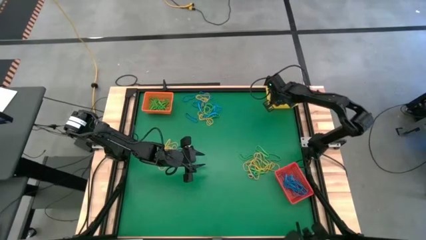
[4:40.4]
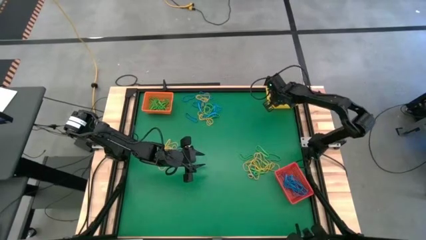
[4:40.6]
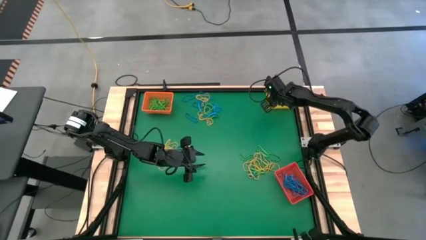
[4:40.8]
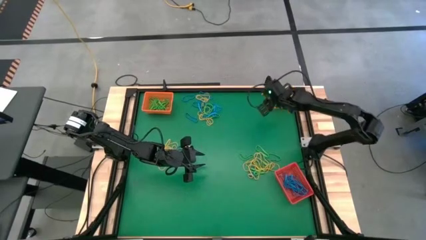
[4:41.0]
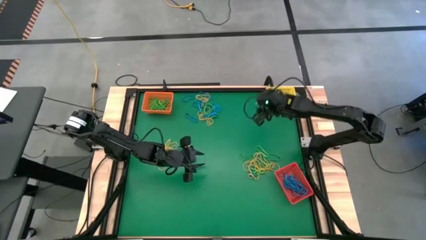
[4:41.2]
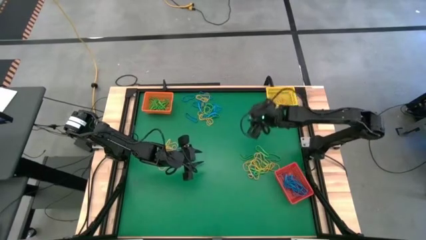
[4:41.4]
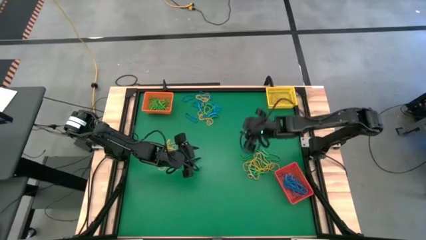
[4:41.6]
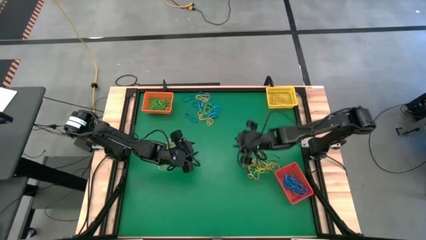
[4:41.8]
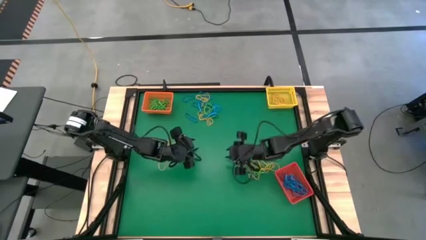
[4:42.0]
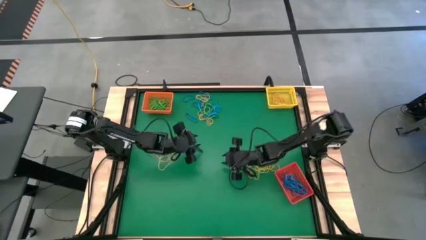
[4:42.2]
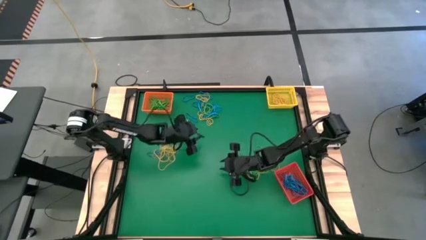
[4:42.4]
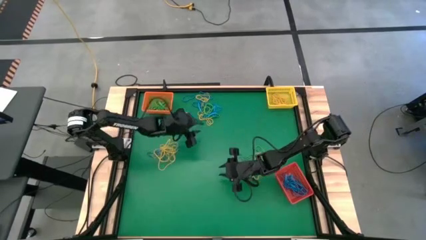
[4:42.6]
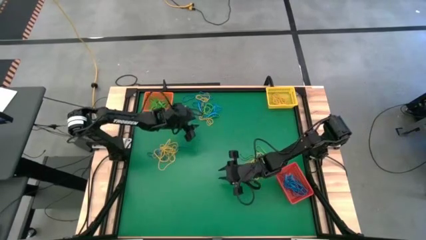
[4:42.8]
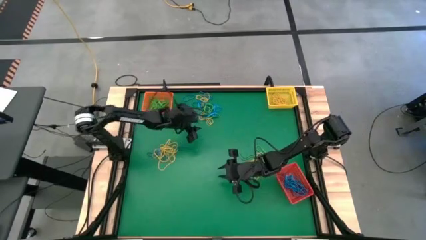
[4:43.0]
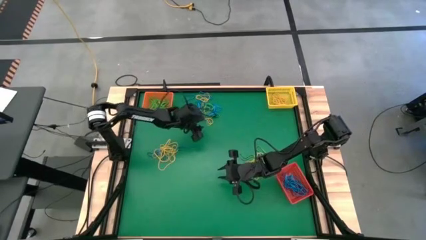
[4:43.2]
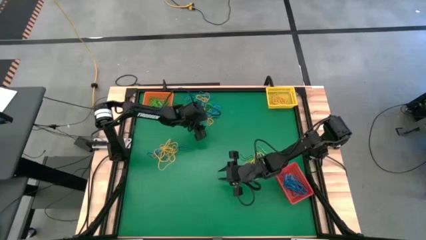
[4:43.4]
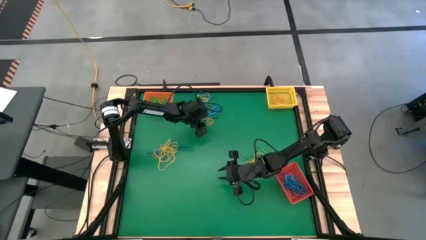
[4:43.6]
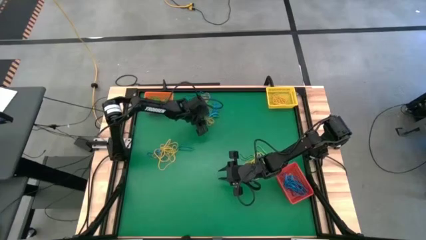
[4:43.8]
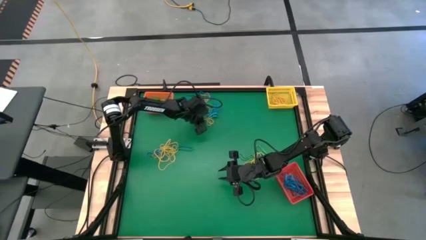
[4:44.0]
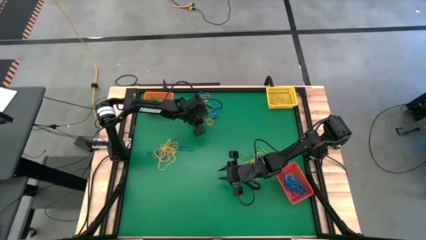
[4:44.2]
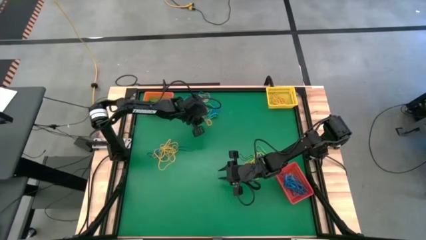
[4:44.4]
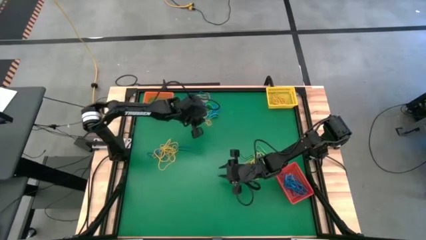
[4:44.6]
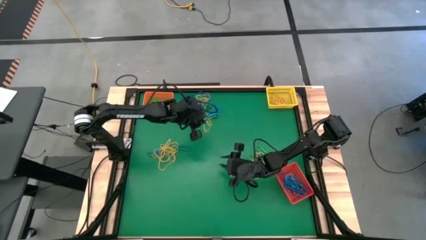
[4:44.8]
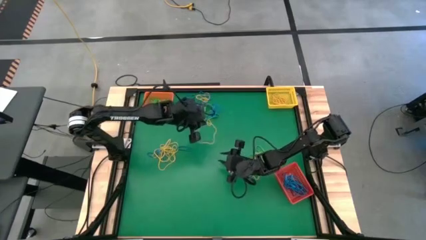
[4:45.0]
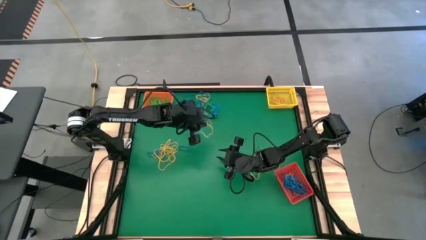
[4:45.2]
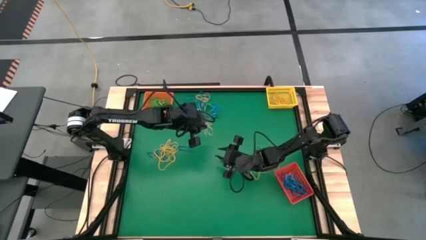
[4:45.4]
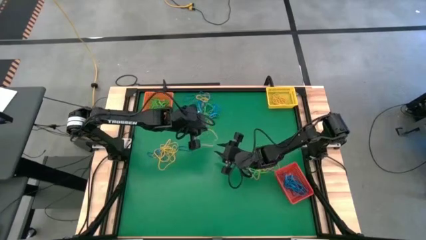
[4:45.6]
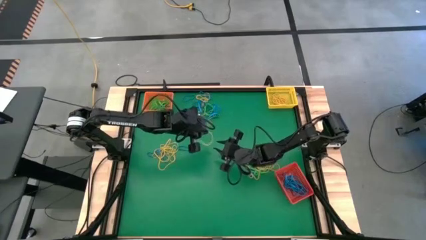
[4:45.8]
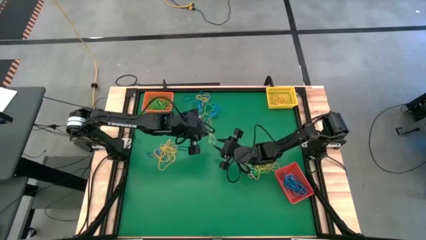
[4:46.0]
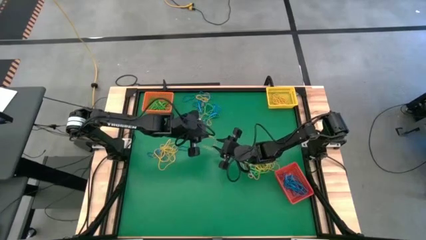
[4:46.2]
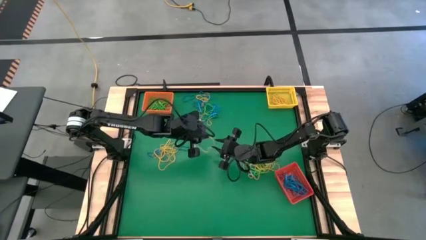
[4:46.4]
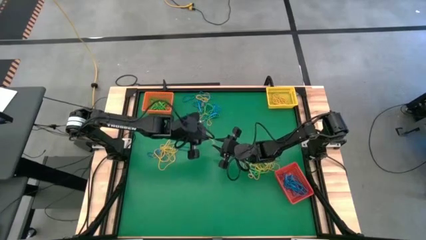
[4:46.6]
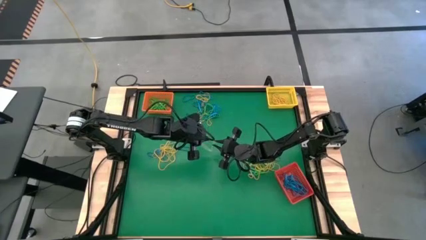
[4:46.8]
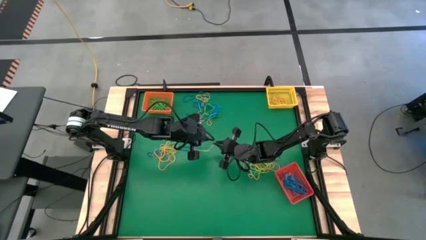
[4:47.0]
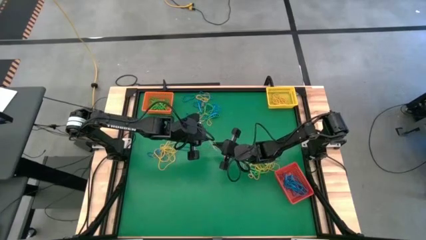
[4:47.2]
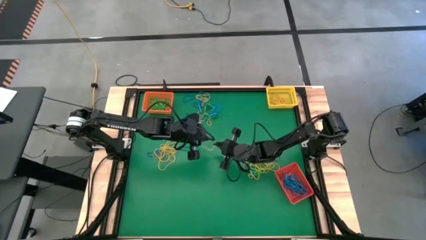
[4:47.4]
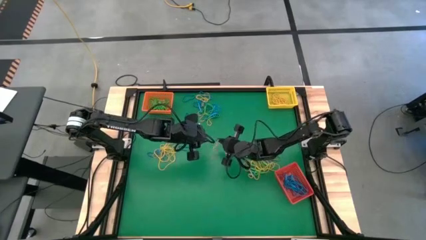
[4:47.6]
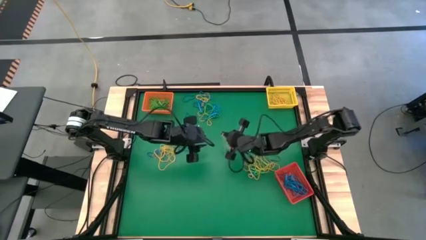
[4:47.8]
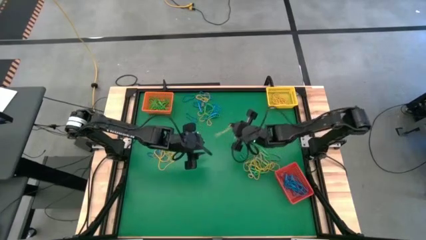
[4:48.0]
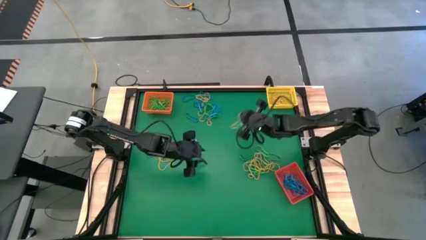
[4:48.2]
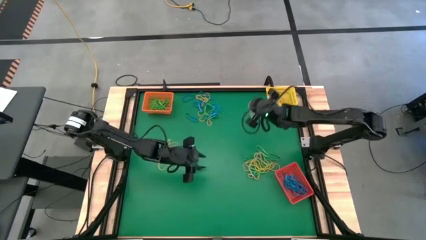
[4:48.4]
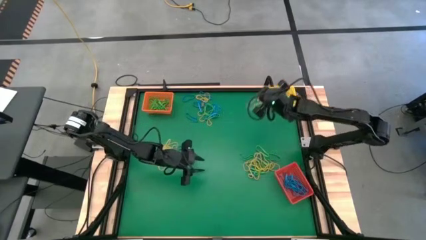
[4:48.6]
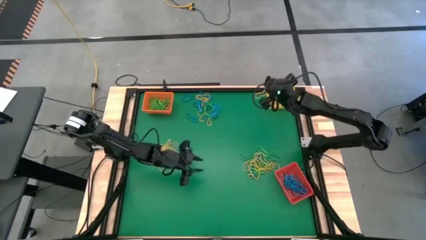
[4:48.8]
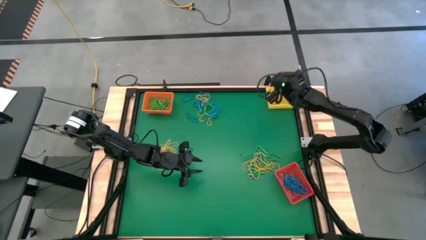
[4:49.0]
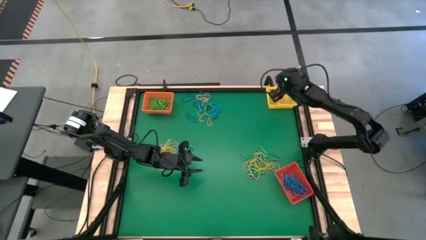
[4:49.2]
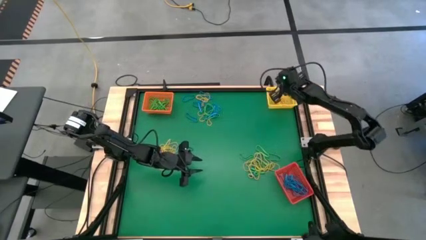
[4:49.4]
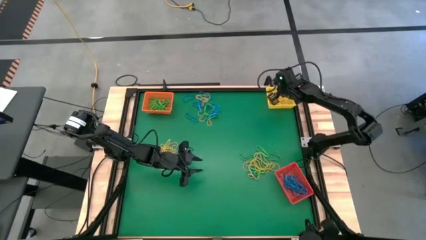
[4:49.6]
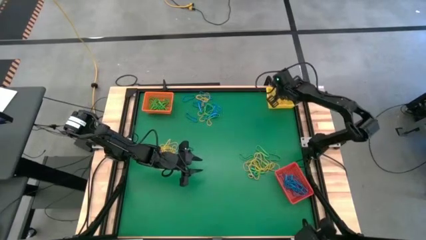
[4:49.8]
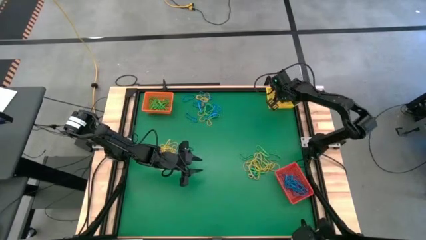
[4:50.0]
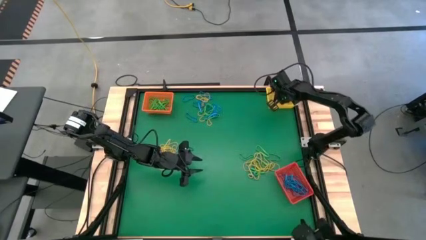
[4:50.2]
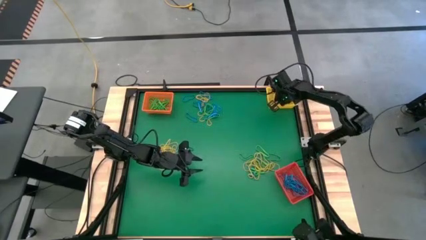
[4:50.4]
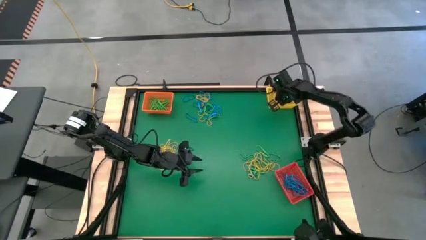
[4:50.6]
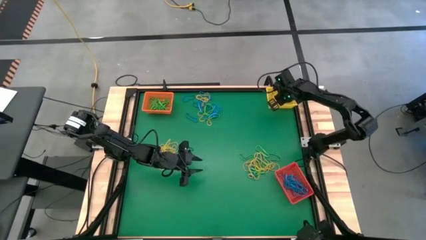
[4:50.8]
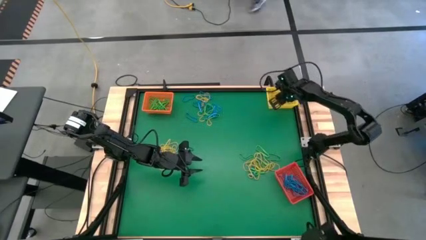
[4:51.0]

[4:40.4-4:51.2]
Task: Sort rubber bands into baskets
Put the yellow rubber band into the yellow bin

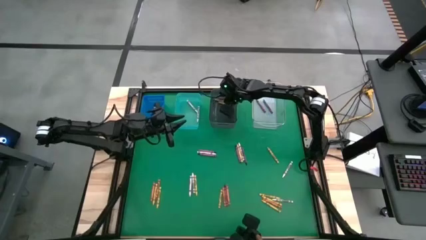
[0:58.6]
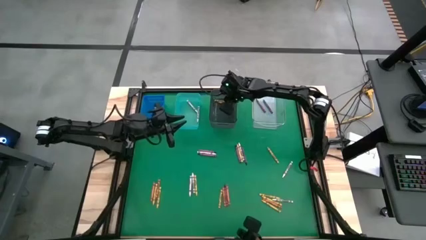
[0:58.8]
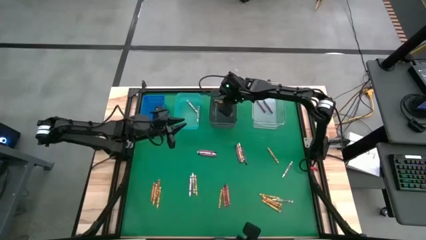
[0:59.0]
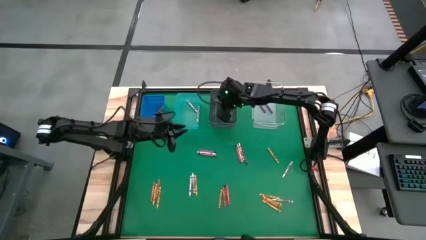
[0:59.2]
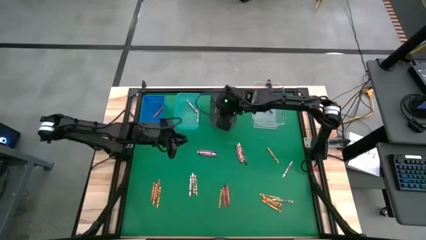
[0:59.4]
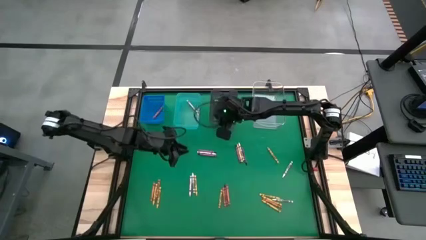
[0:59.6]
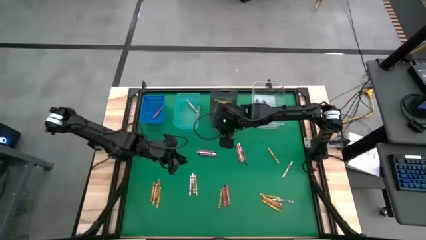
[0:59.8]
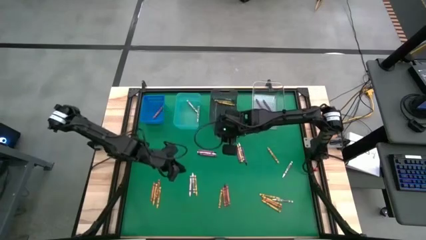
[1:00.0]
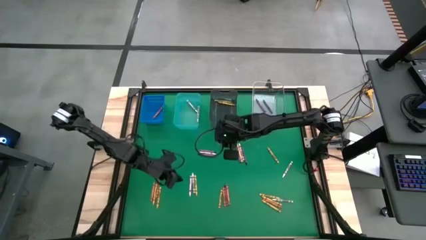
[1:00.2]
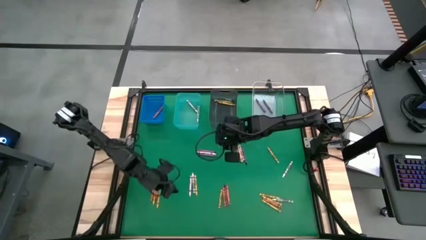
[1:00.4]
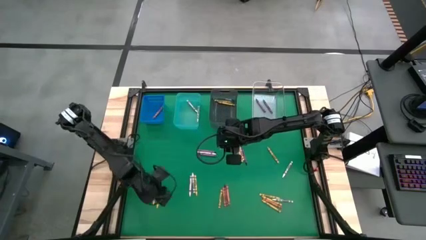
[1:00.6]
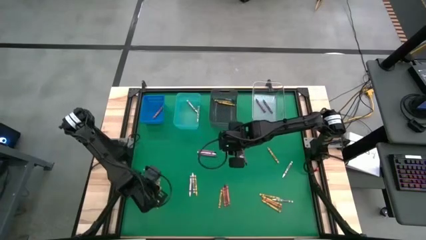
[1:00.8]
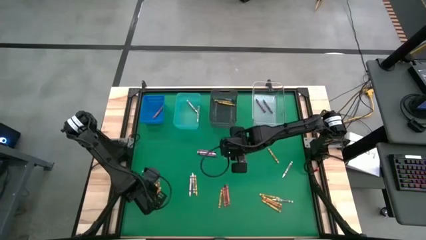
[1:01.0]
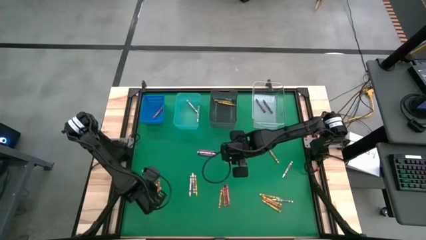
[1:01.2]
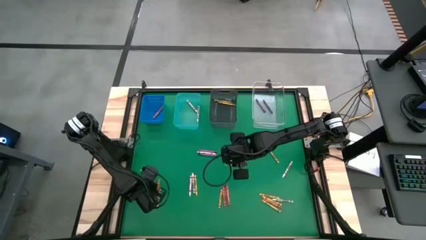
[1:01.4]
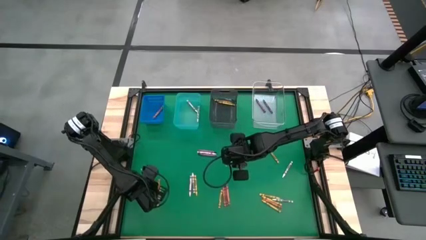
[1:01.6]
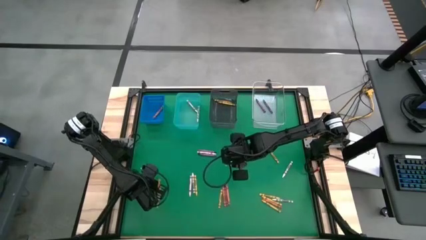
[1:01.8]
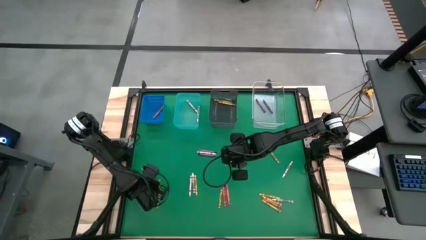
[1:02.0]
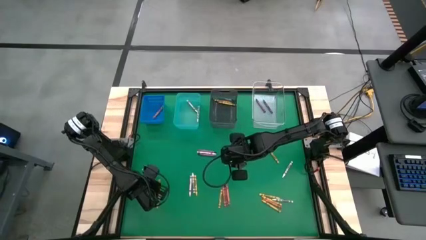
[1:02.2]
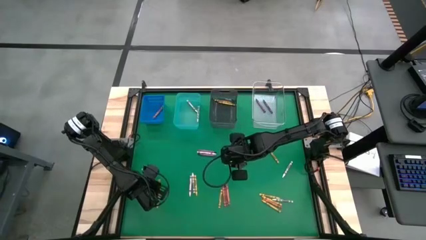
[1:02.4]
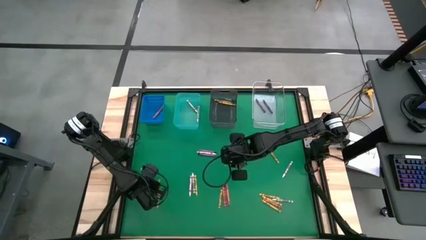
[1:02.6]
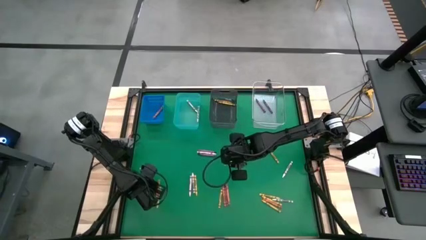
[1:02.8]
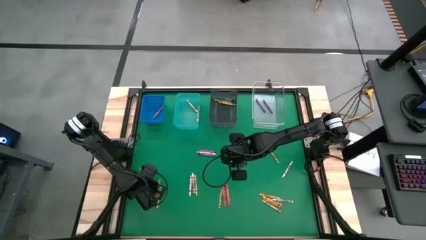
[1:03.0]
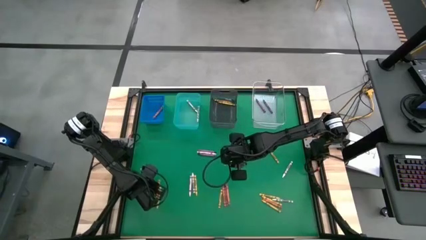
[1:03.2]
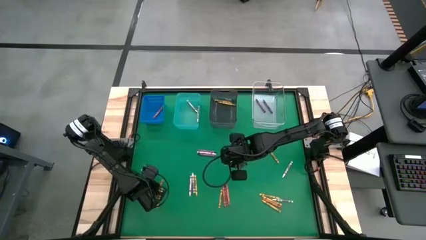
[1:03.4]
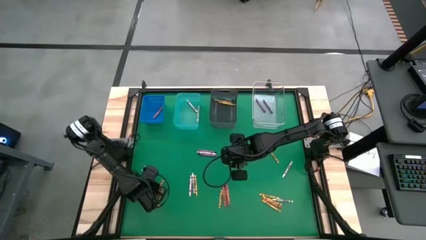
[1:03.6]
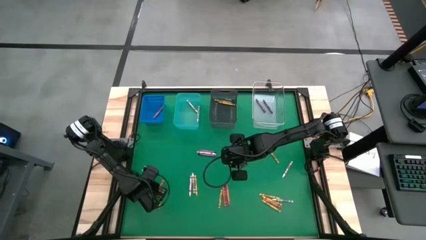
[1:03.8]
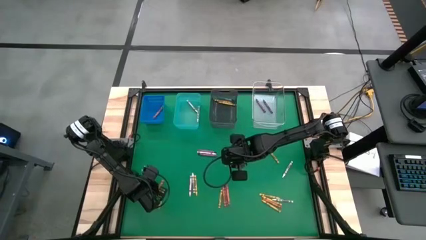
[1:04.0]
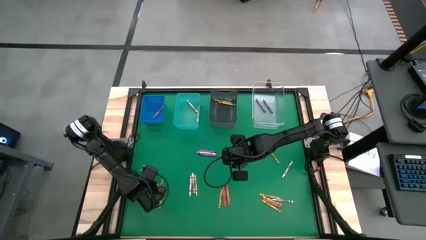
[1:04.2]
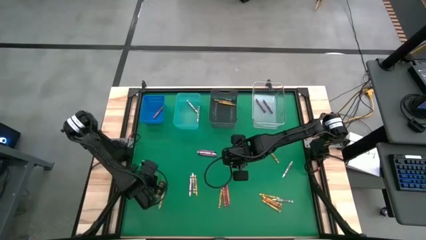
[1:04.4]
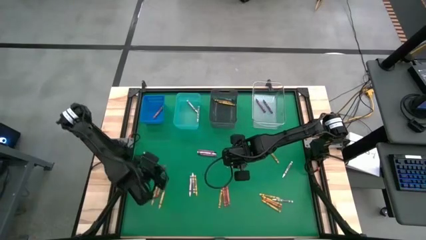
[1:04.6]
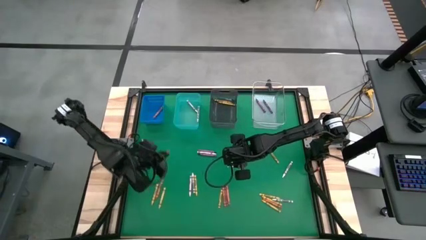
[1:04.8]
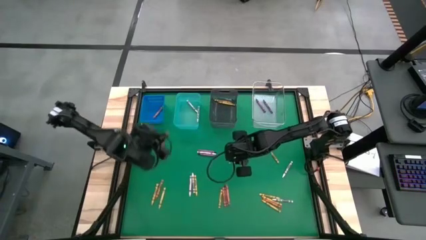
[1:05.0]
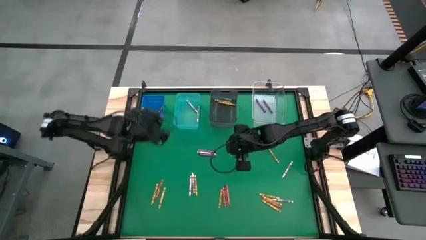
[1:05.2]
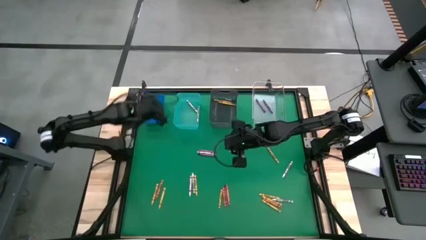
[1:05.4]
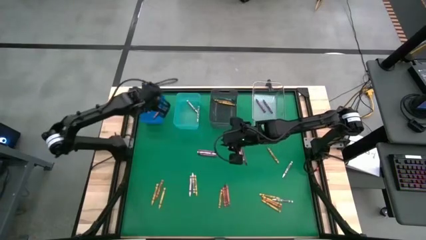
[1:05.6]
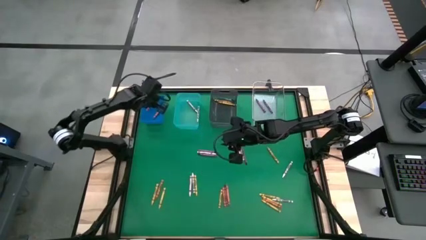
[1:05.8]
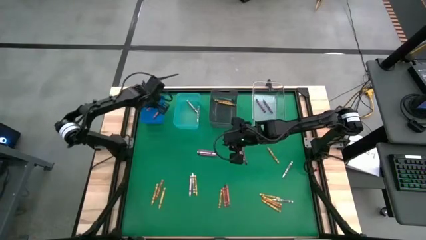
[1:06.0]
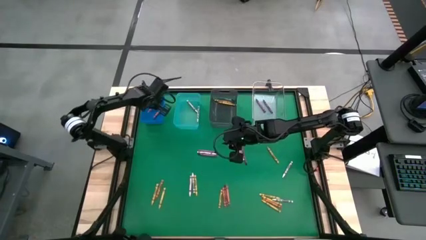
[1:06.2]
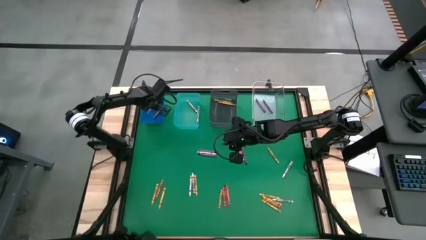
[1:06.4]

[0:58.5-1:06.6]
Task: Sort crayons
Put the red crayon into the blue bin
